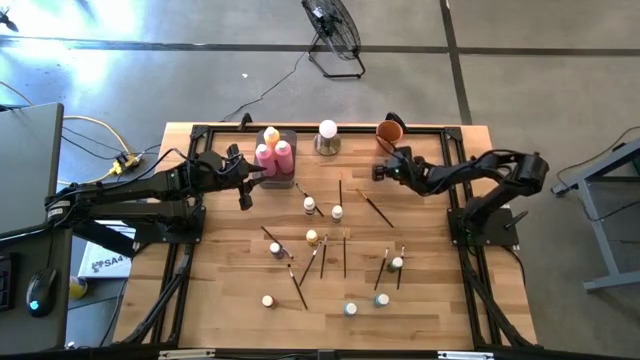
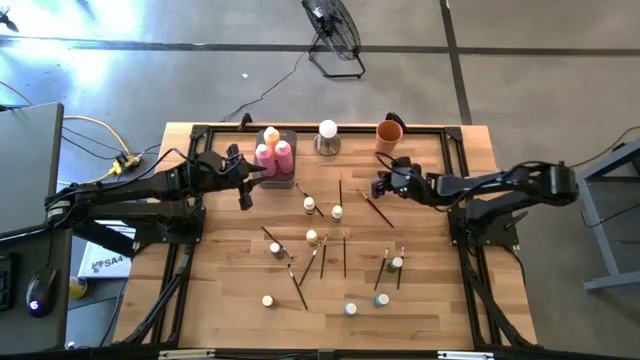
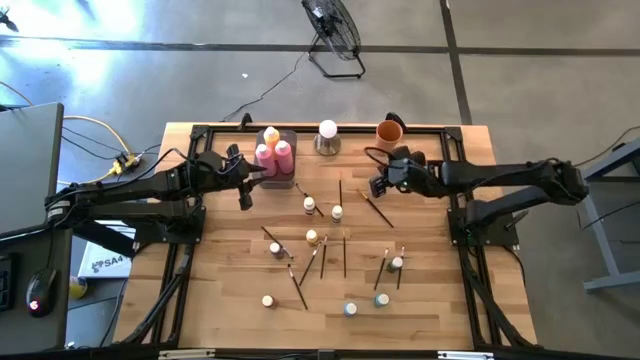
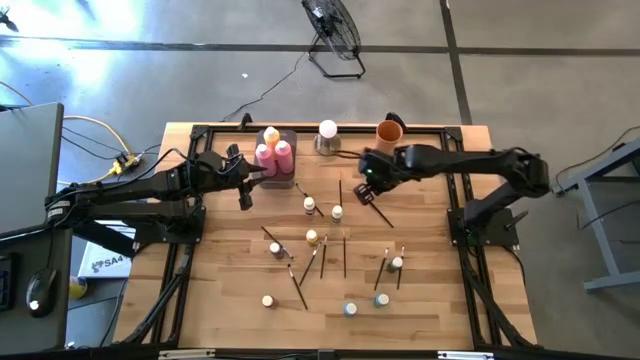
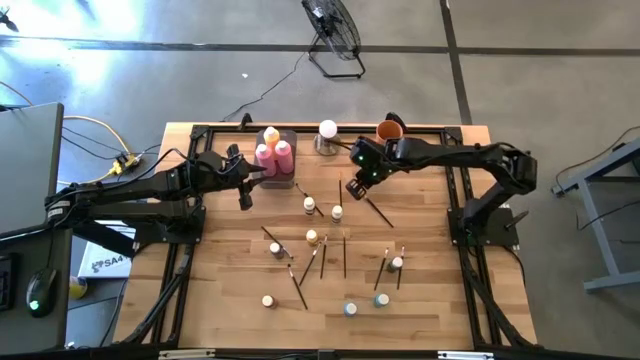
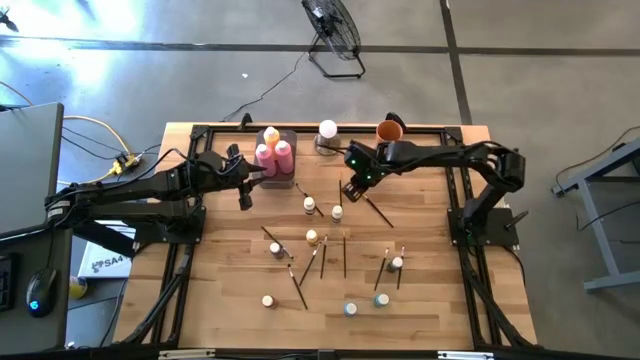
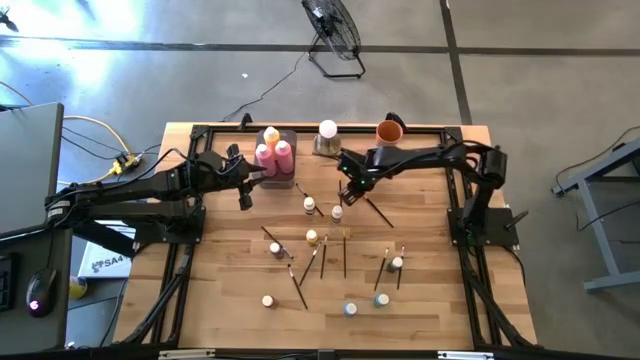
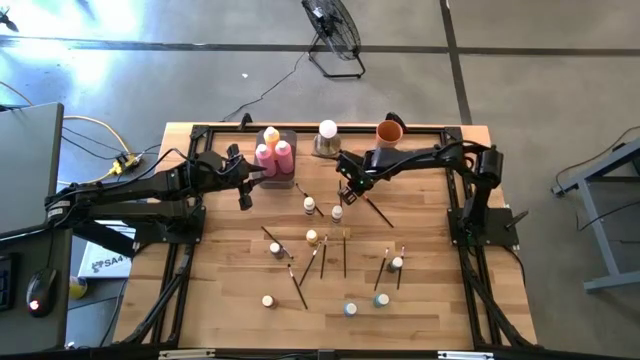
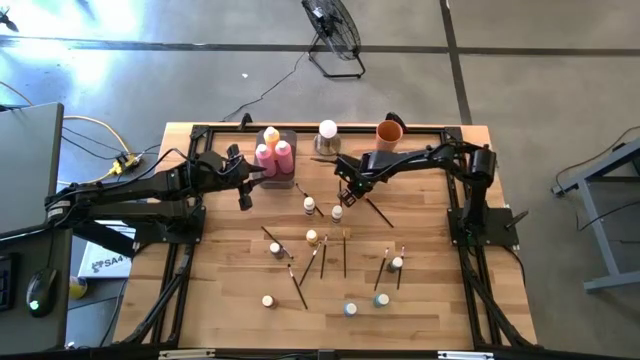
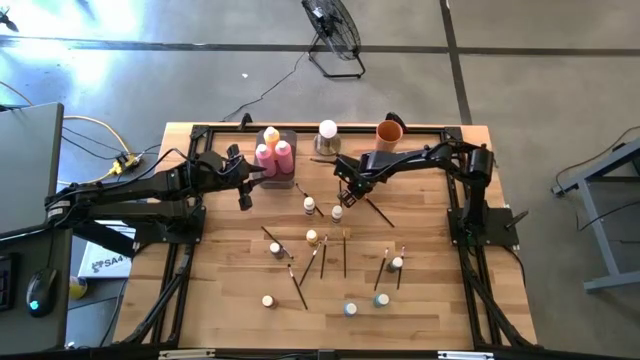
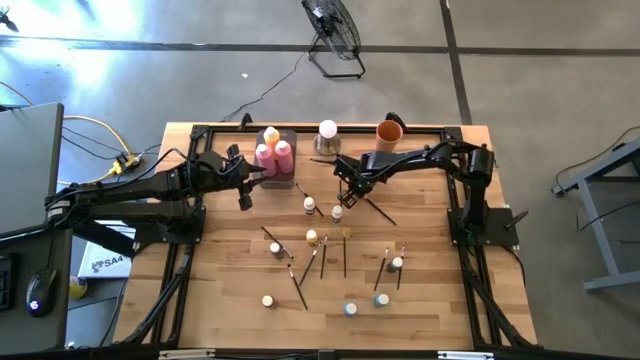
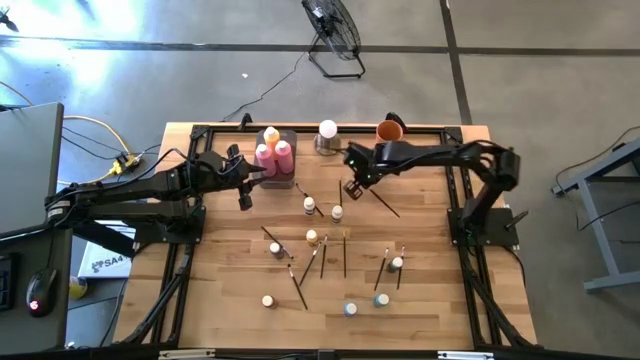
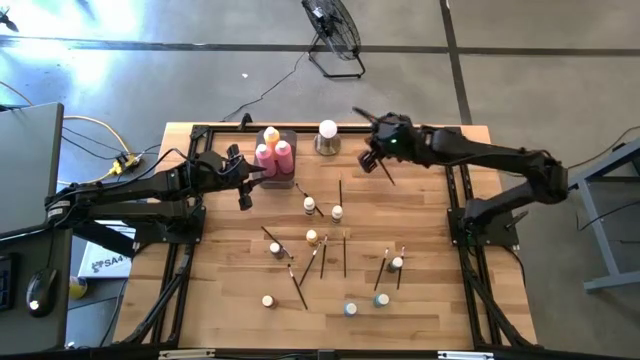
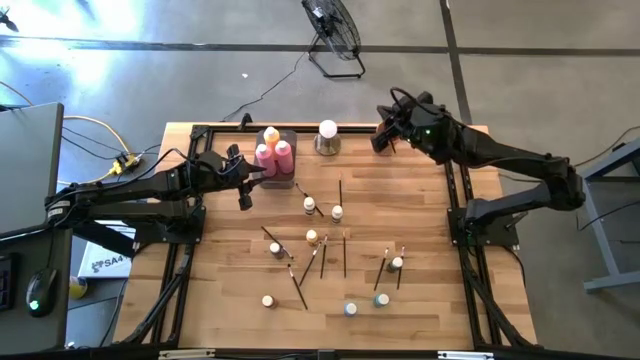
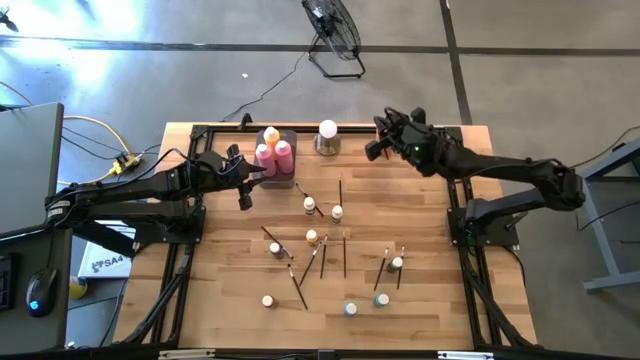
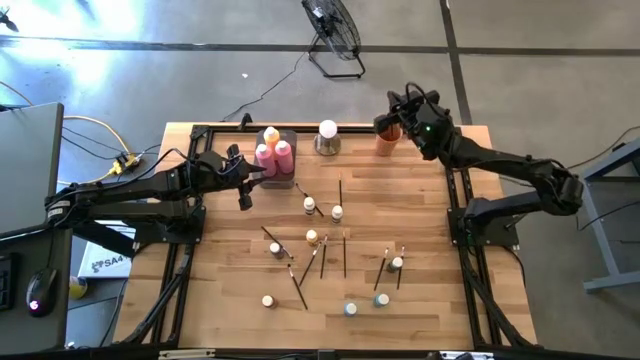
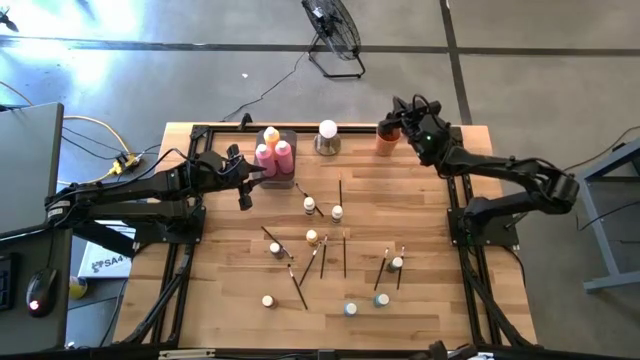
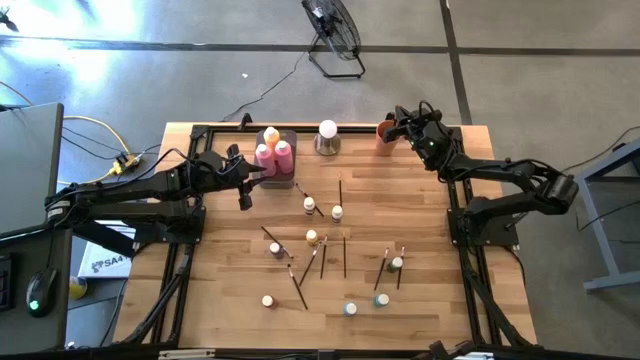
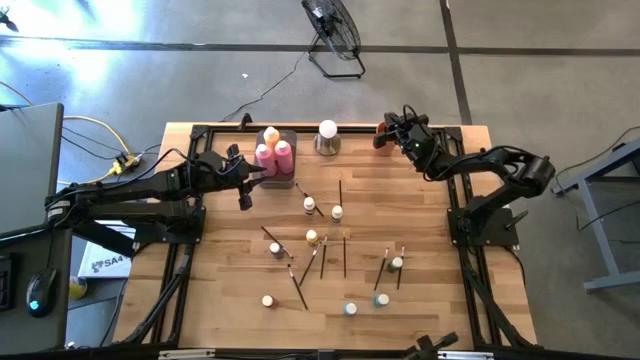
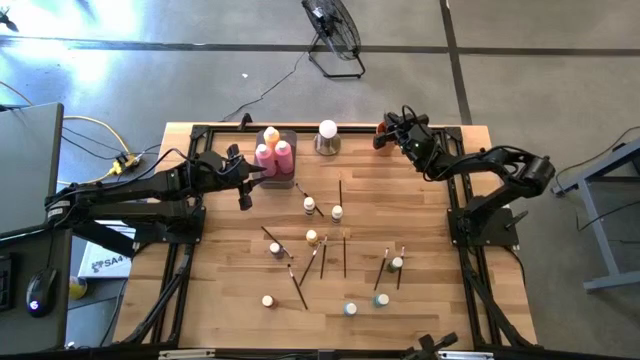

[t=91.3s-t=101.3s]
Task: Pick & Place Paint Supplies
Put the orange paintbrush into the orange cup

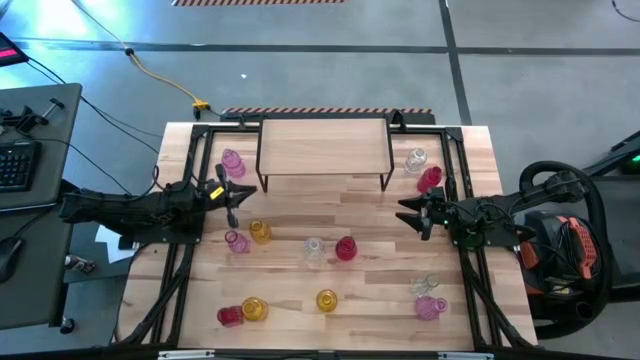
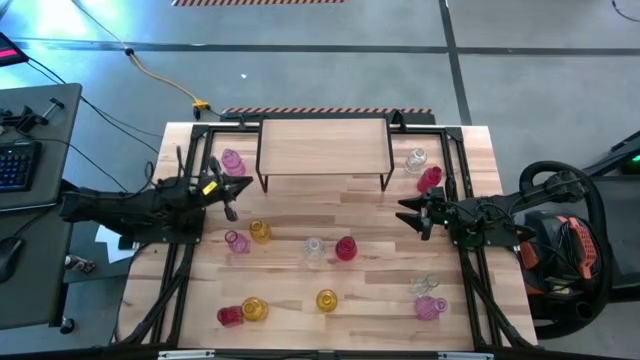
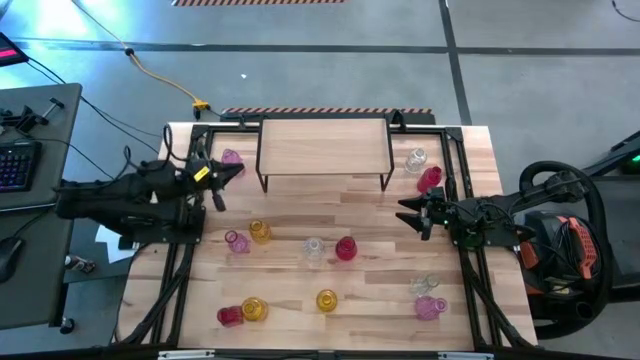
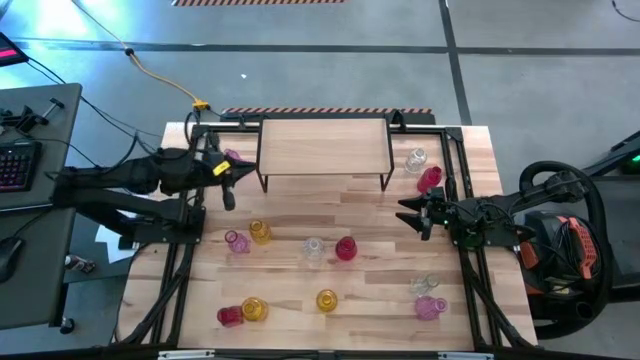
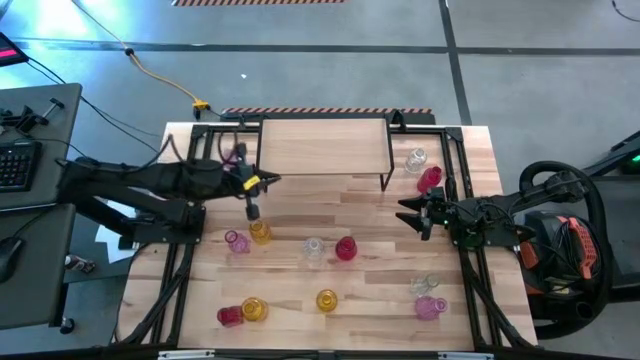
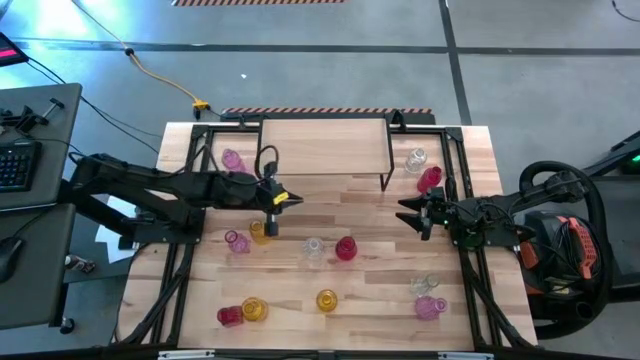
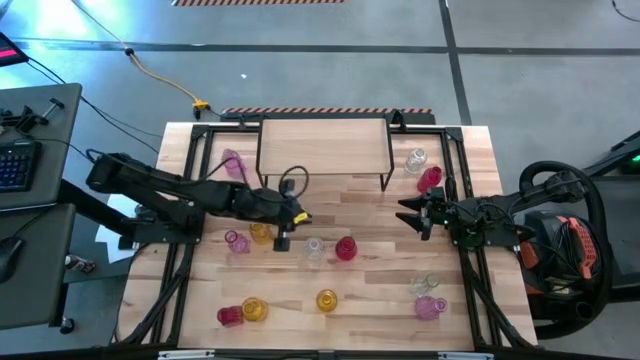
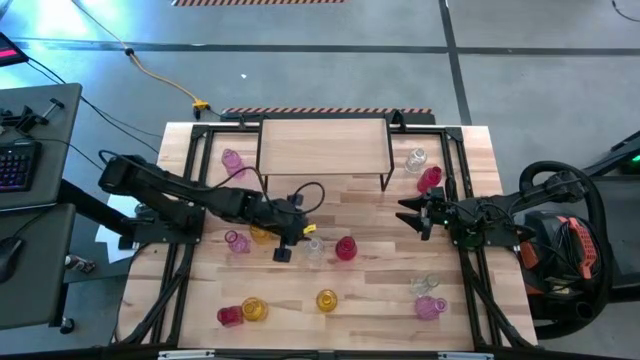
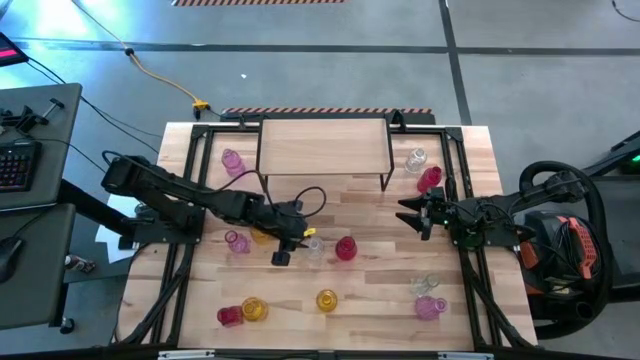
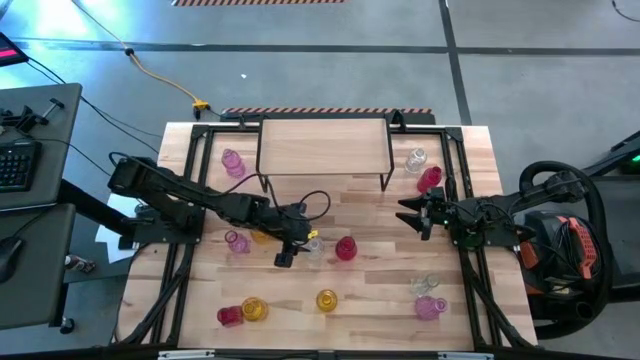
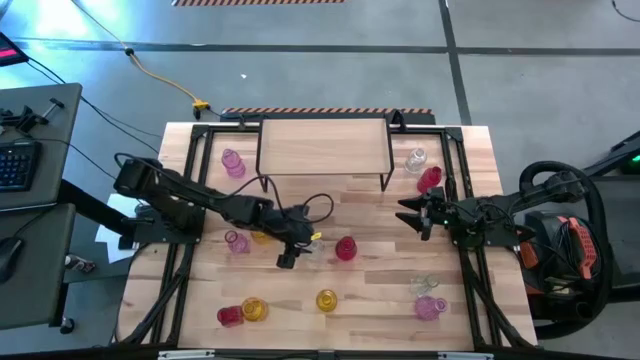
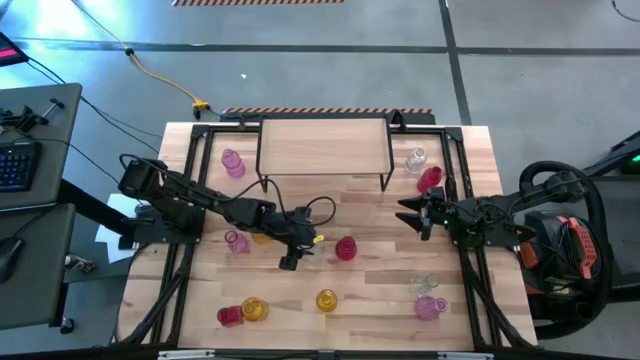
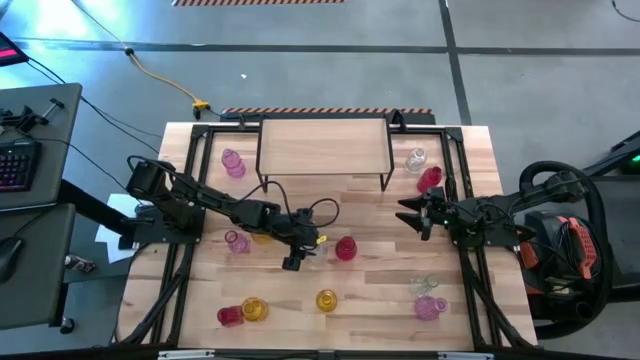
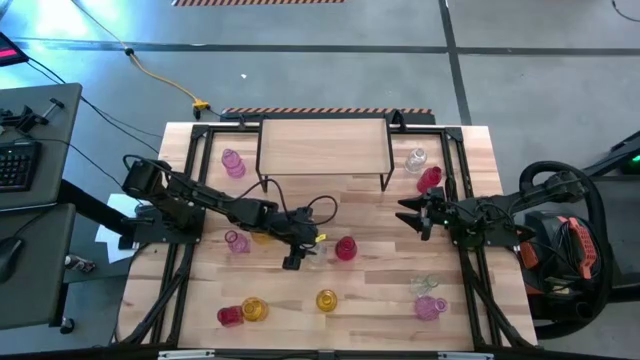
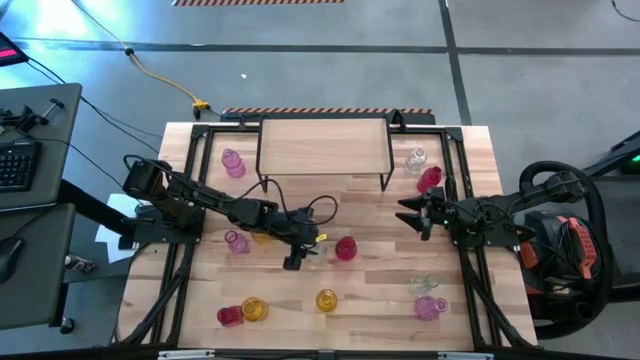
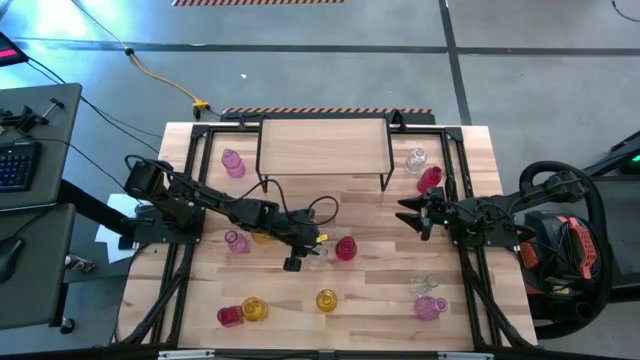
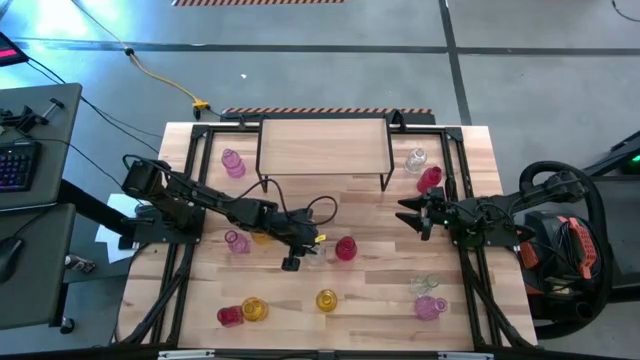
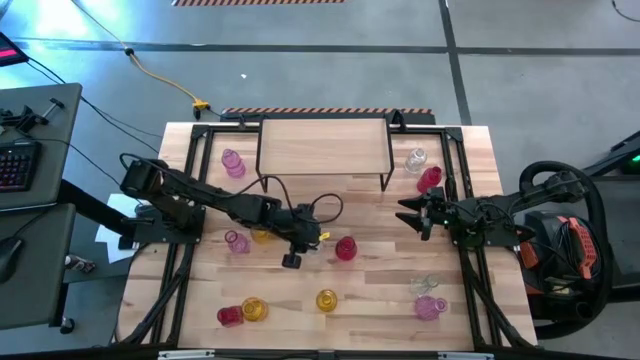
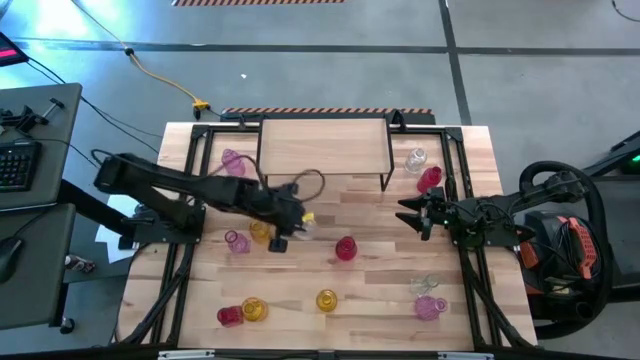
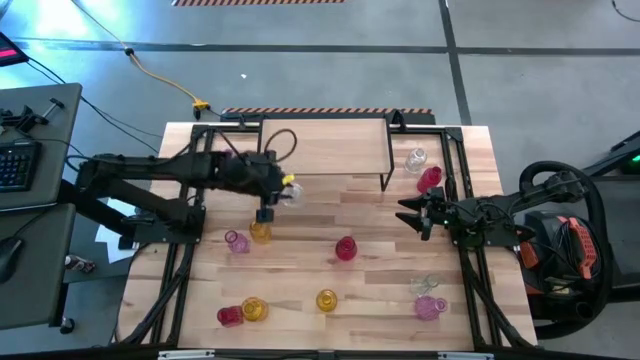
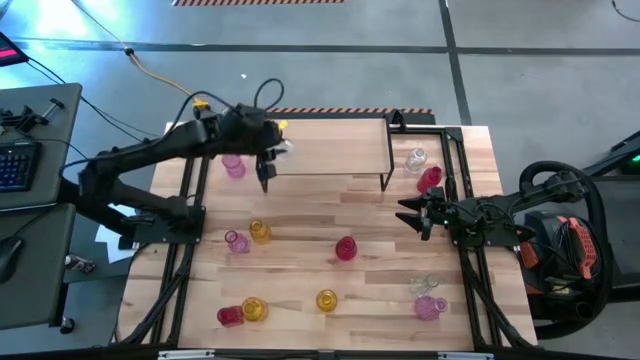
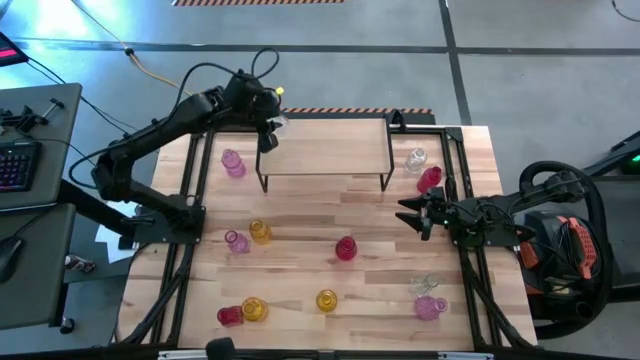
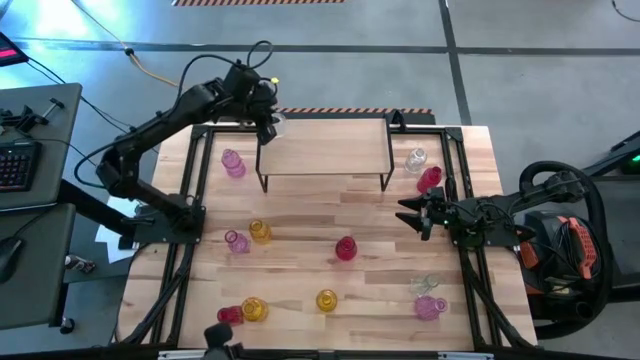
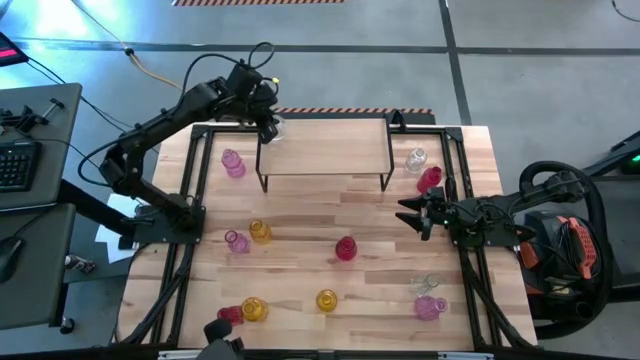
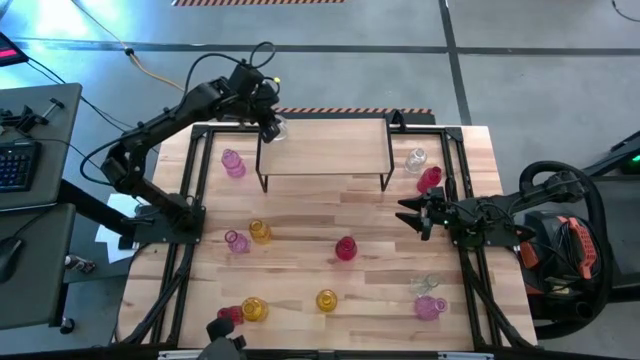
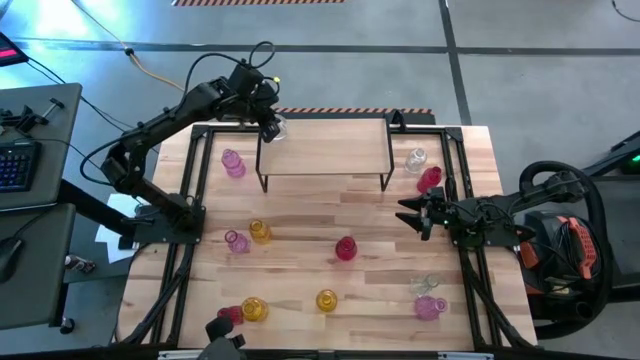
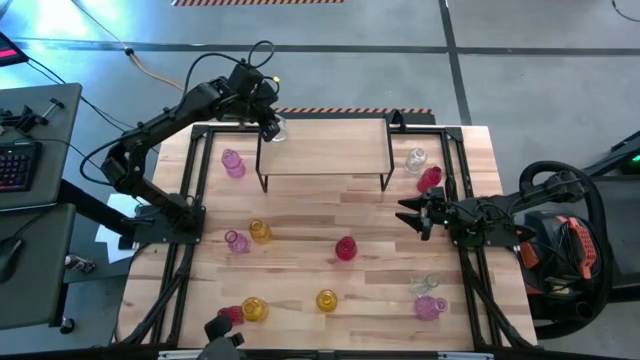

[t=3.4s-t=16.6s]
Task: sort vases onto shelf
Put the middle transparent vase on the shelf
